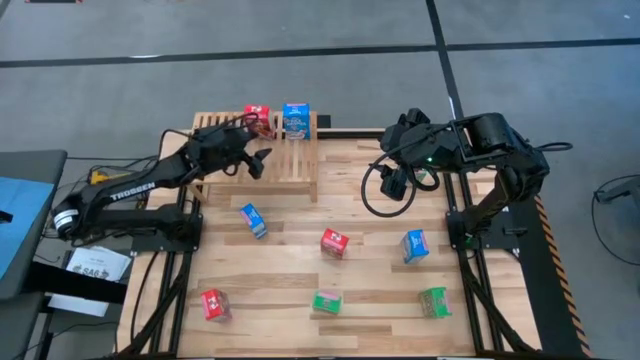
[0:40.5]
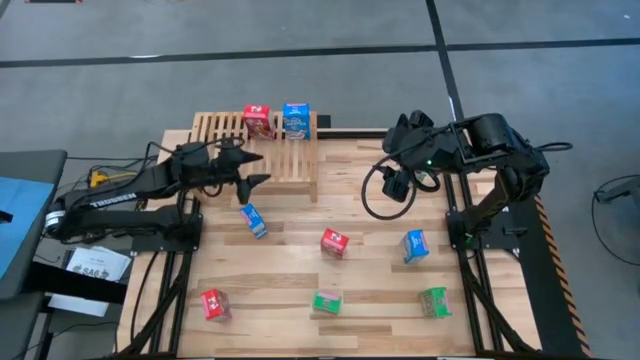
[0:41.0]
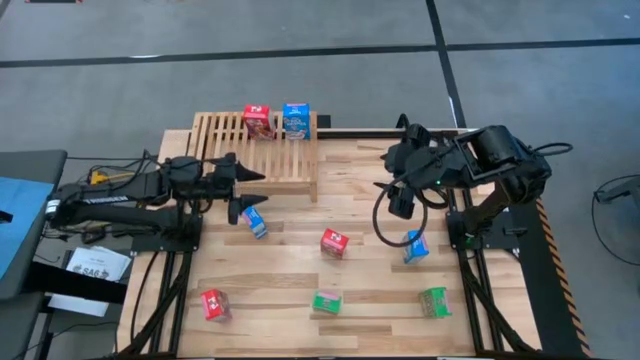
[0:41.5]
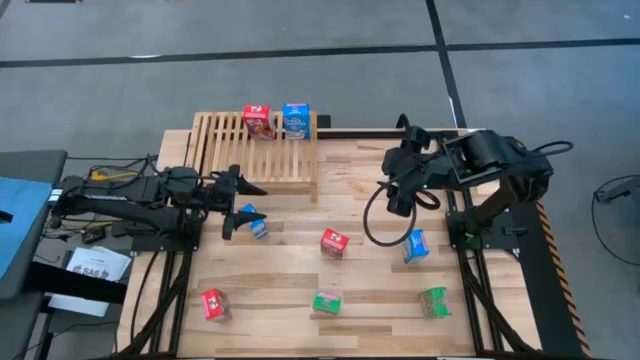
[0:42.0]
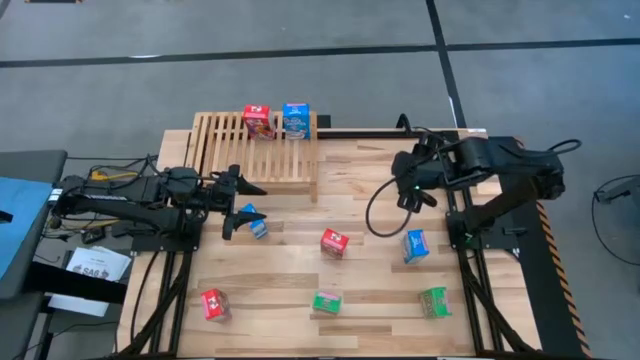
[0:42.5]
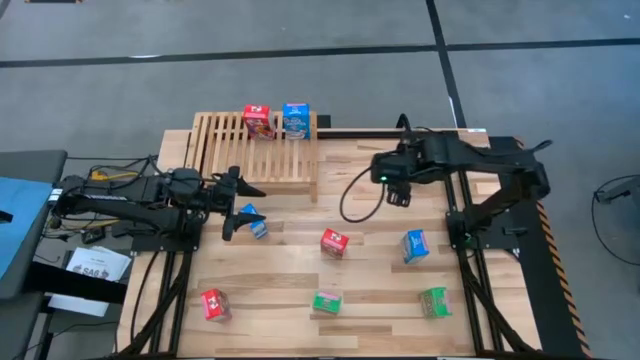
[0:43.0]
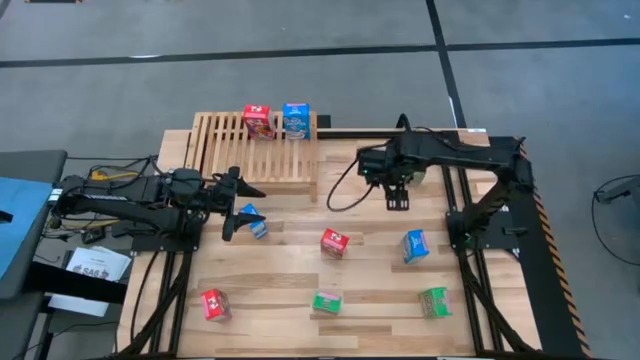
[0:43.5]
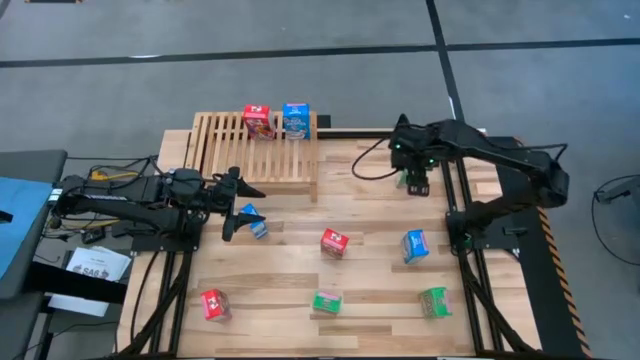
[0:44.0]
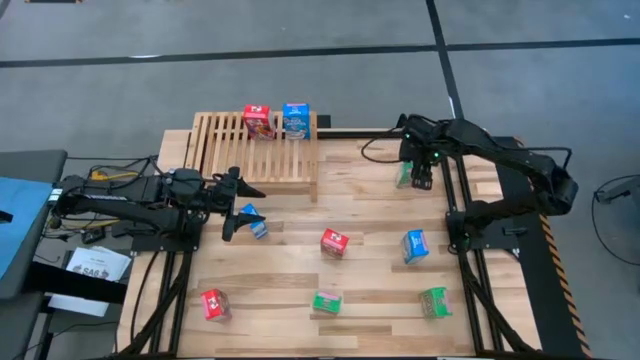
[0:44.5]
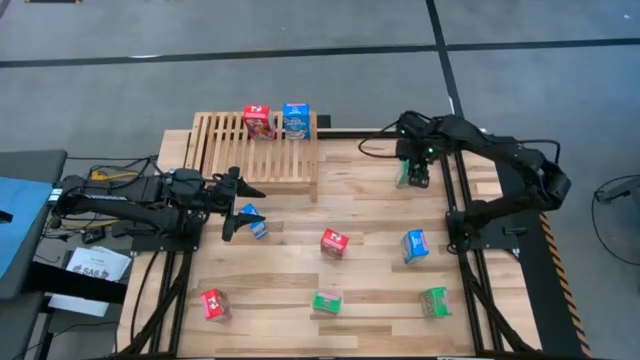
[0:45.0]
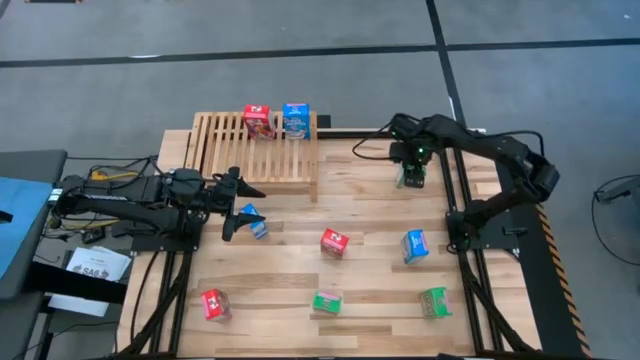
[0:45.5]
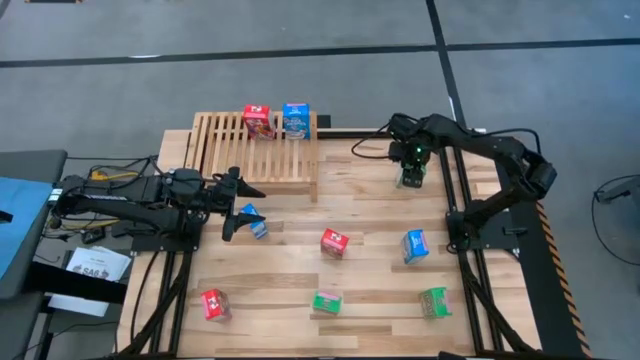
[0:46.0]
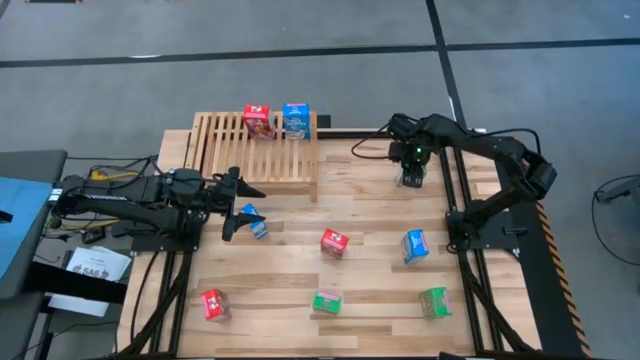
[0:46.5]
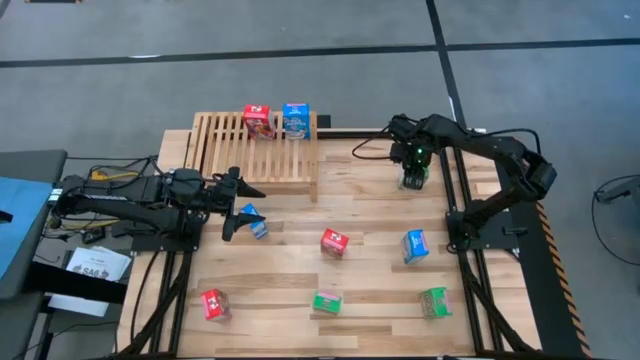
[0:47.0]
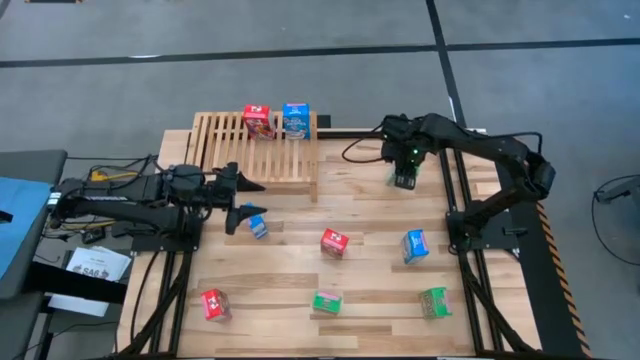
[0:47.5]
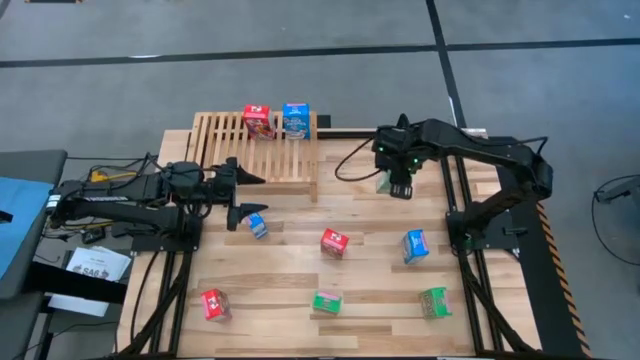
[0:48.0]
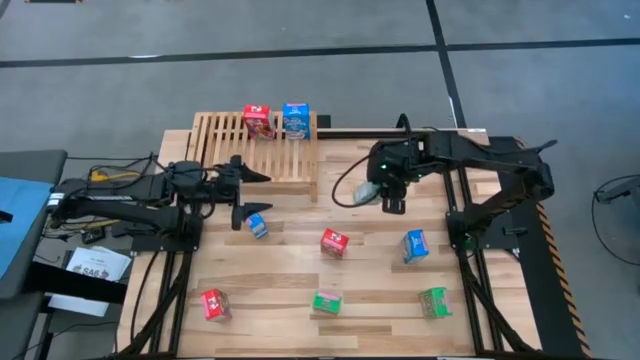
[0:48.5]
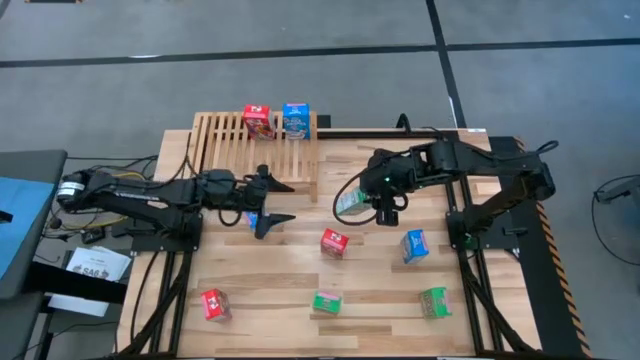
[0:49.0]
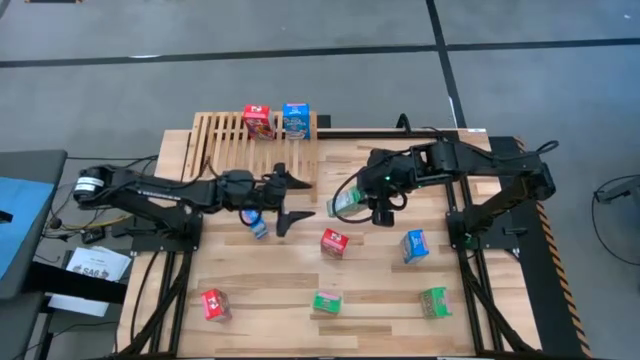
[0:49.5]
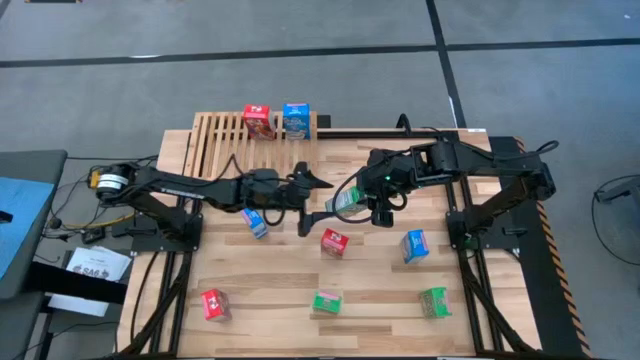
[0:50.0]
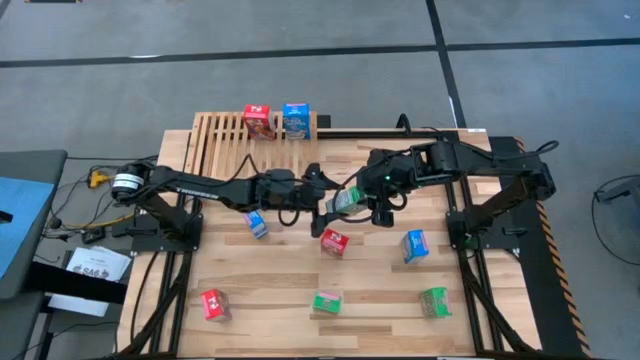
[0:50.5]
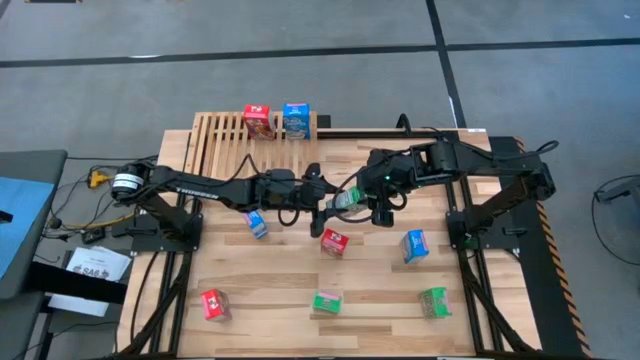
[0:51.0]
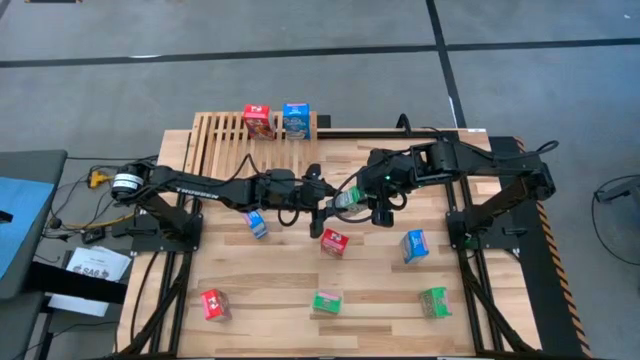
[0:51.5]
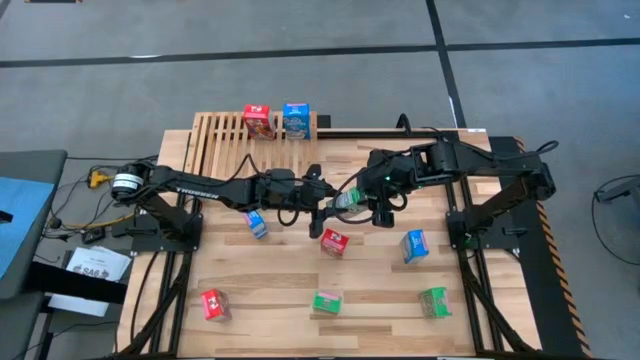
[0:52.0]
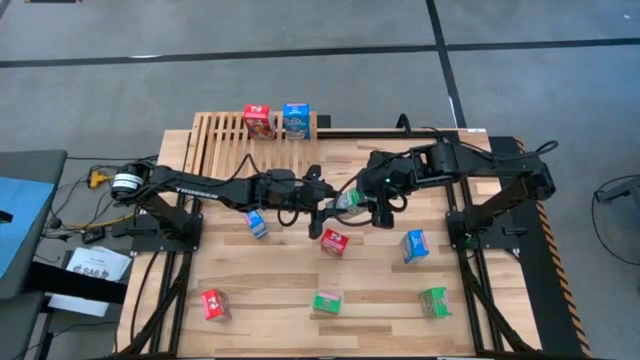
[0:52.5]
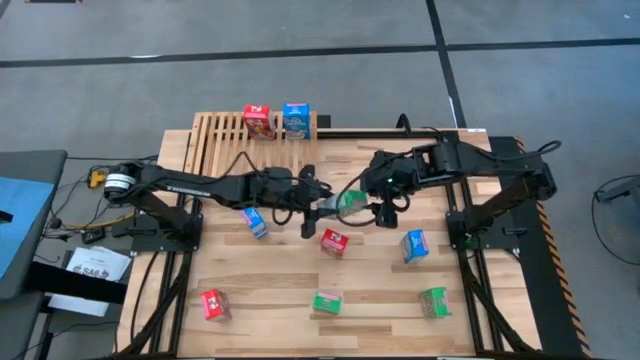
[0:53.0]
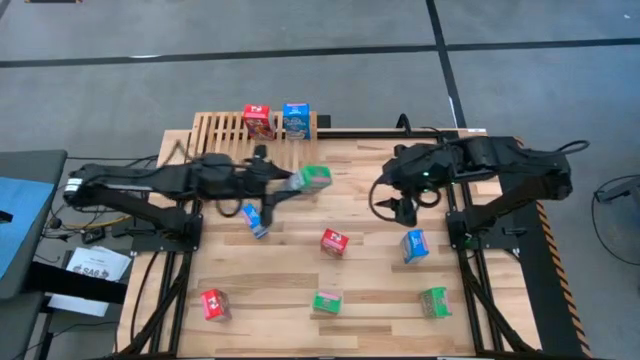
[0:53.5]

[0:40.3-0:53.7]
Task: Stack cereal on shelf
Put the top right green cereal box on the shelf

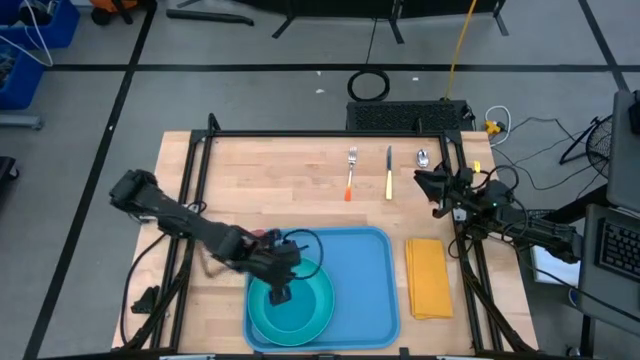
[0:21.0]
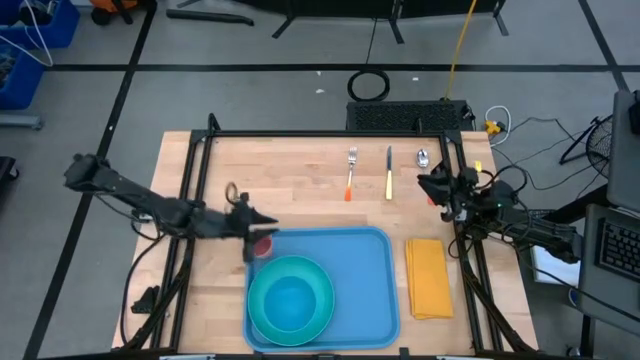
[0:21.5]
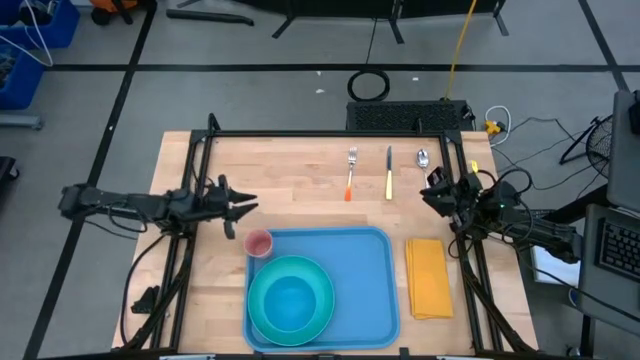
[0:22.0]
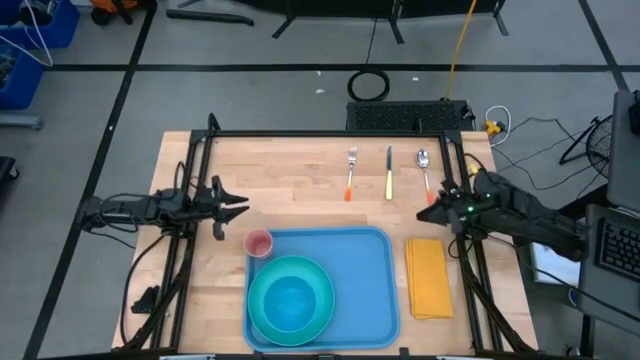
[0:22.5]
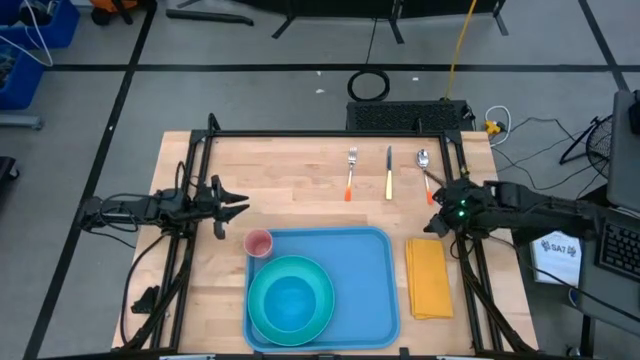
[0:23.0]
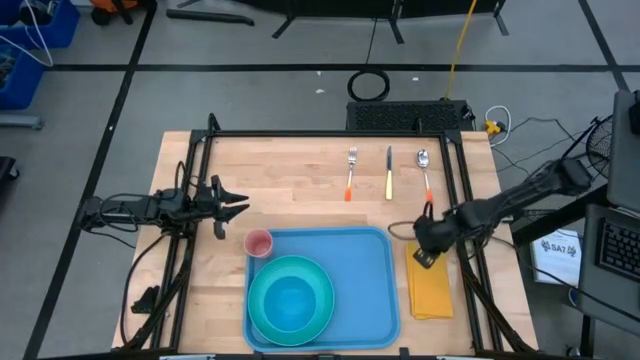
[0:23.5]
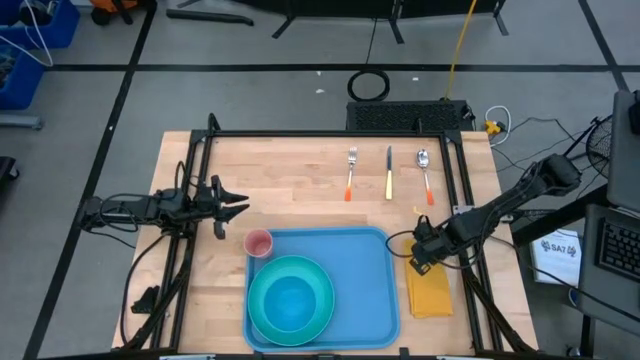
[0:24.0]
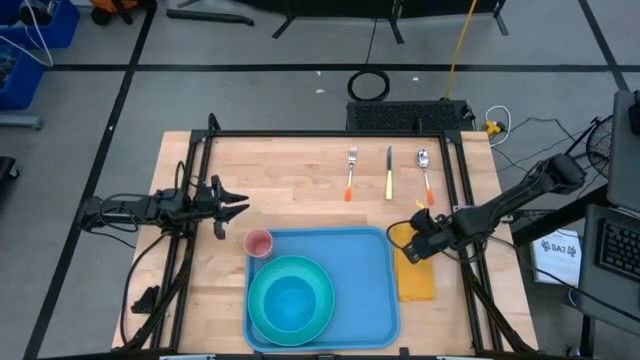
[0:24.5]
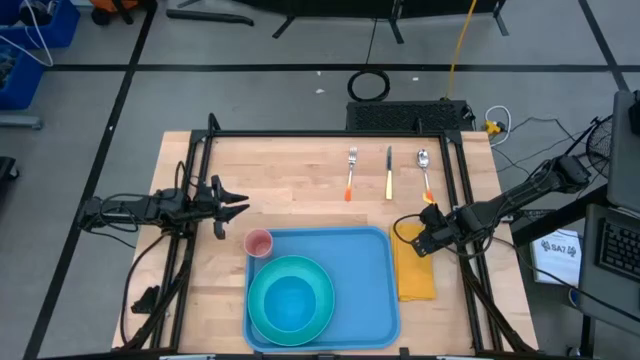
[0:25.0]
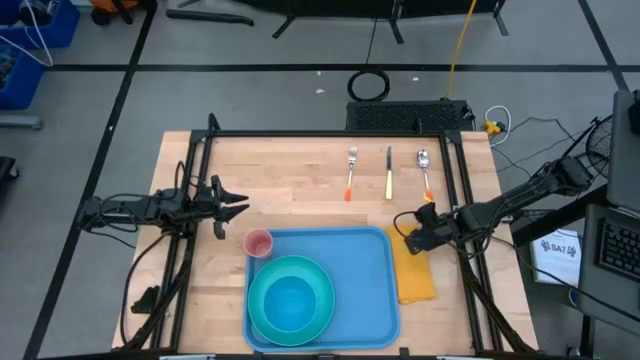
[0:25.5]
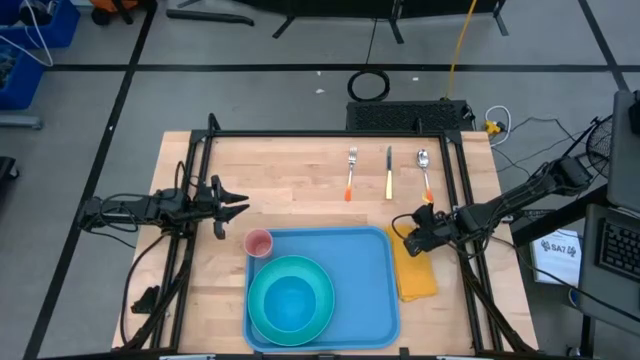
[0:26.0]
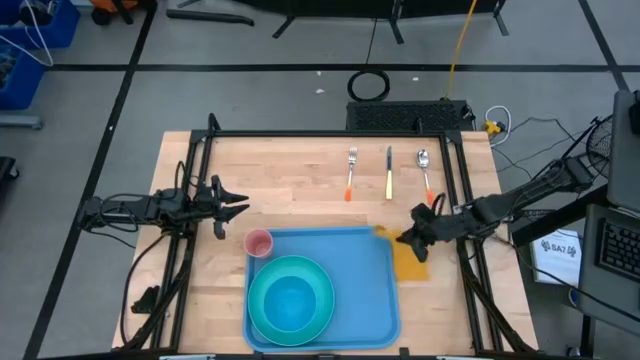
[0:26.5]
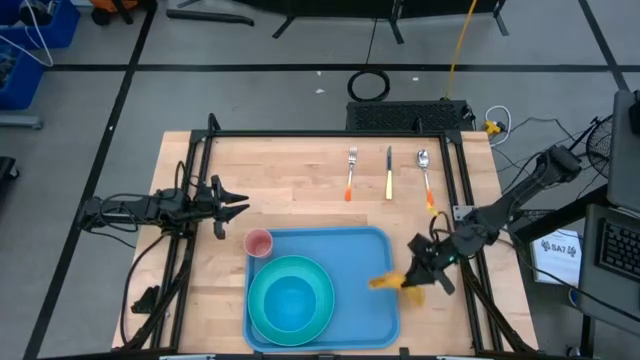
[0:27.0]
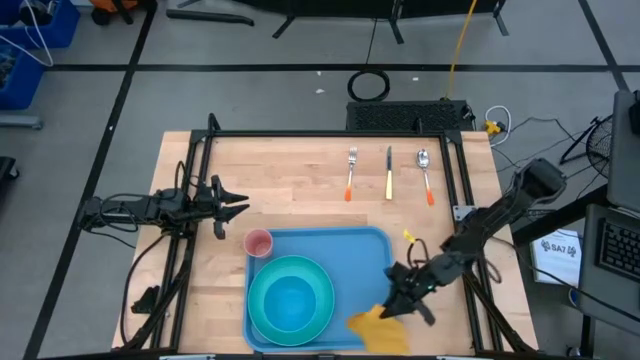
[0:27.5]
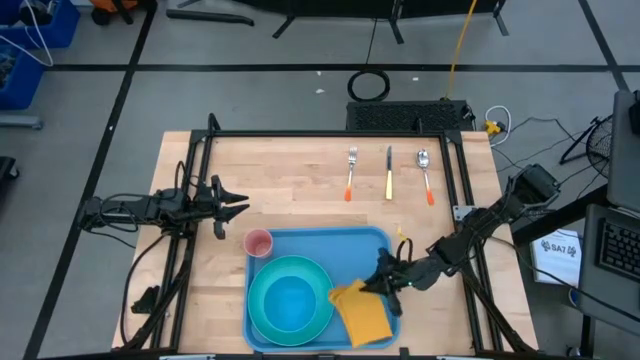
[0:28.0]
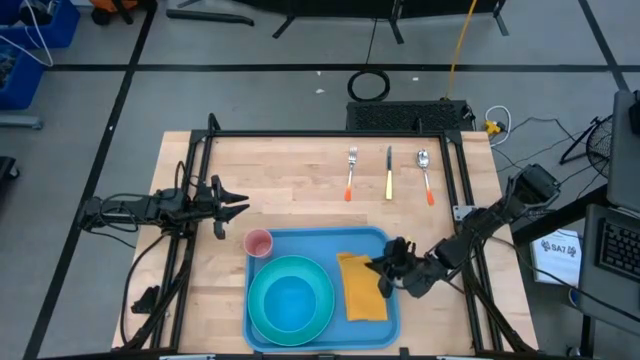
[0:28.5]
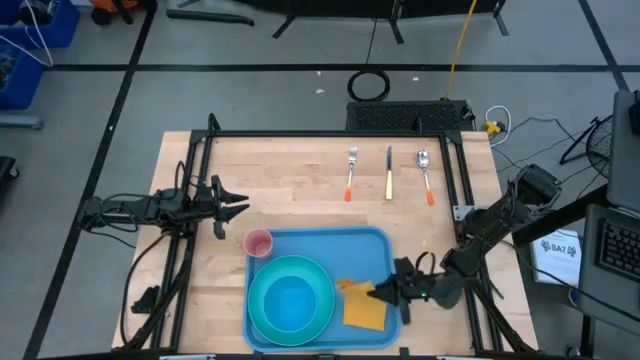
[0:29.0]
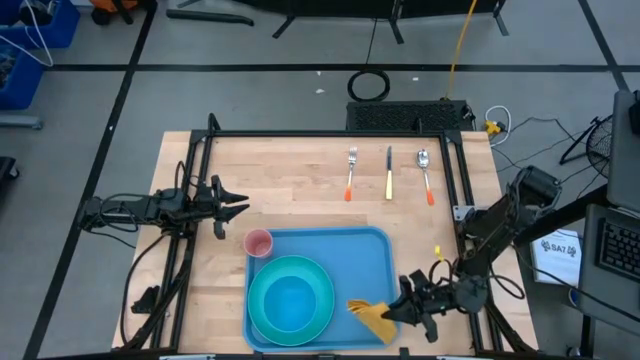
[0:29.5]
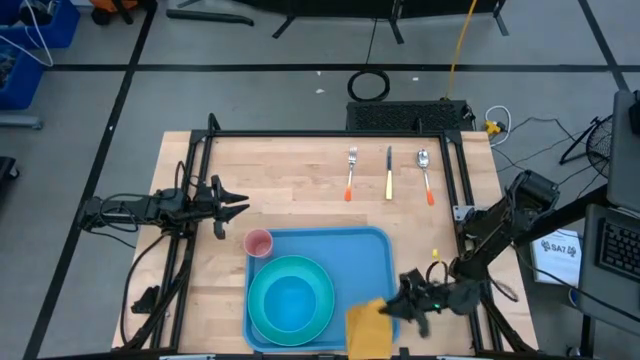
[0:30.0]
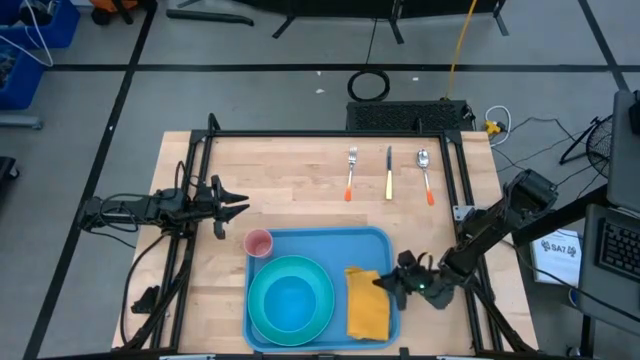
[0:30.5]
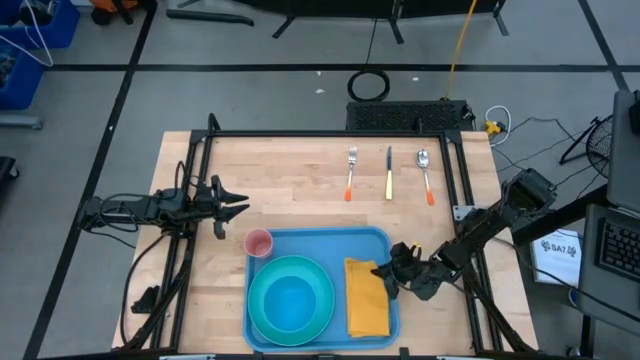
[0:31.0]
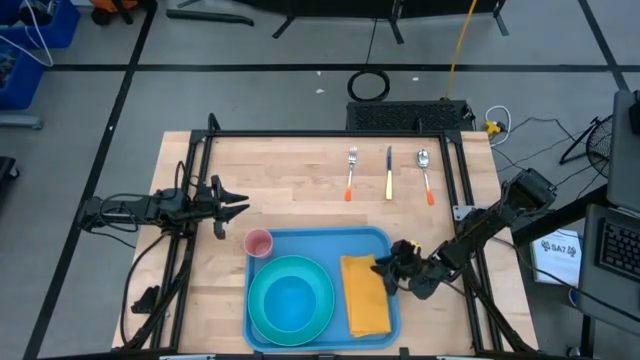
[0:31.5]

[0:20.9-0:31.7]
Task: Set up tray
Put the yellow napkin on the blue tray to the right of the green plate
